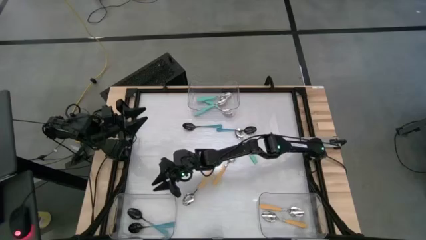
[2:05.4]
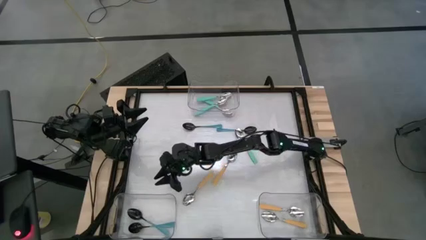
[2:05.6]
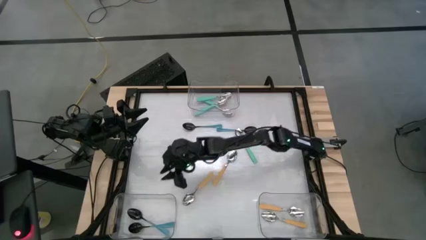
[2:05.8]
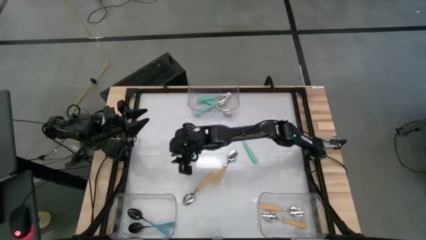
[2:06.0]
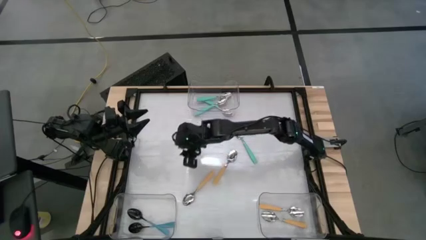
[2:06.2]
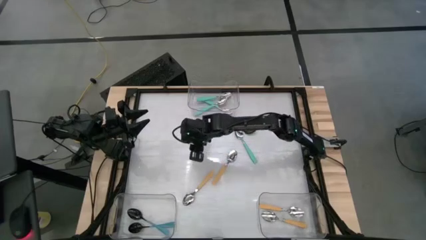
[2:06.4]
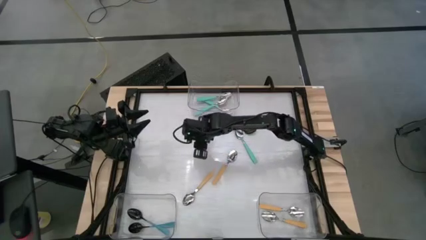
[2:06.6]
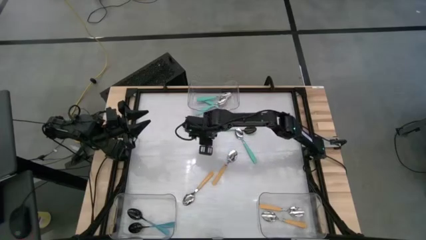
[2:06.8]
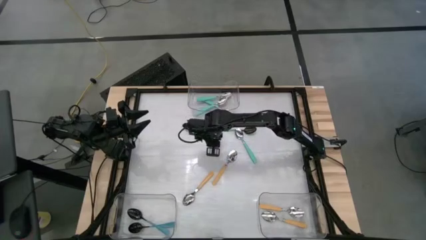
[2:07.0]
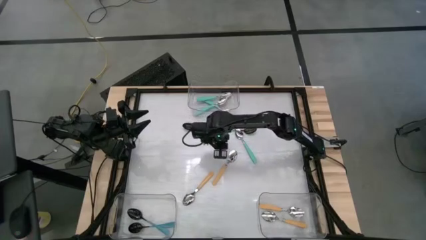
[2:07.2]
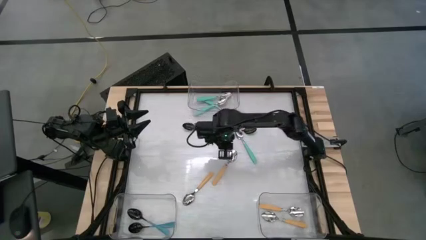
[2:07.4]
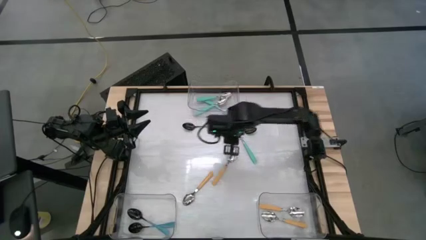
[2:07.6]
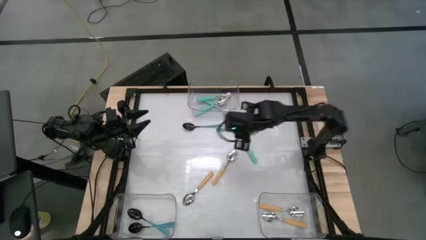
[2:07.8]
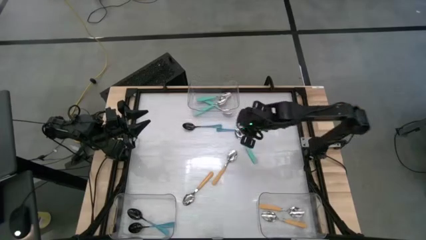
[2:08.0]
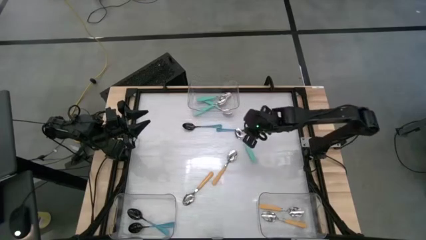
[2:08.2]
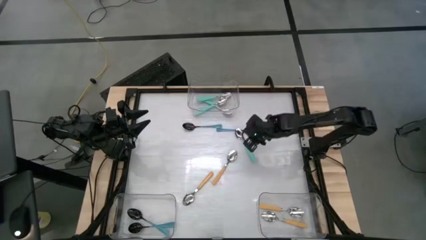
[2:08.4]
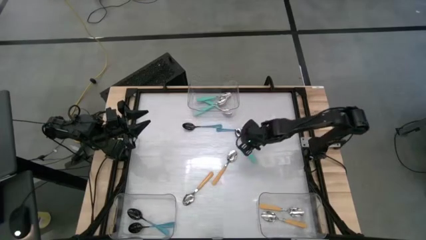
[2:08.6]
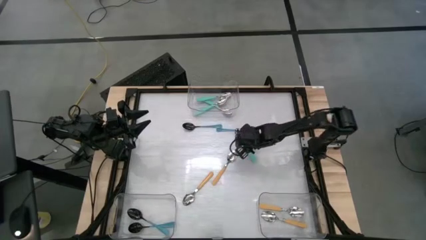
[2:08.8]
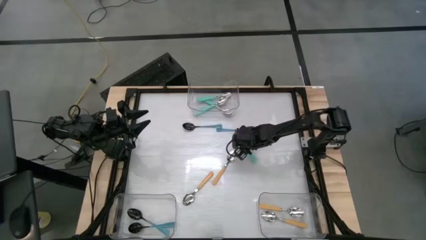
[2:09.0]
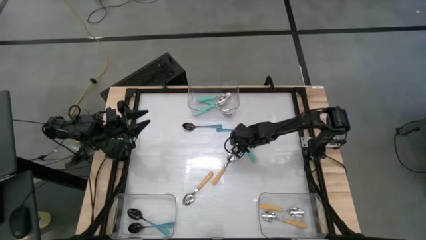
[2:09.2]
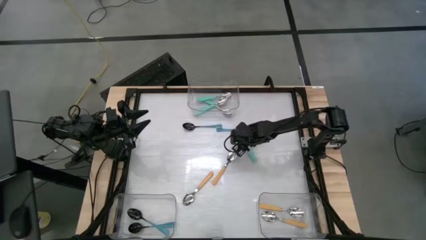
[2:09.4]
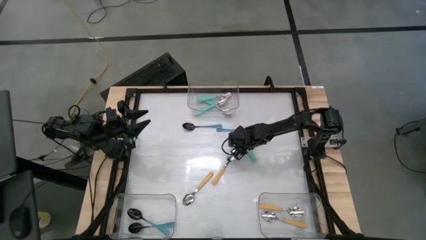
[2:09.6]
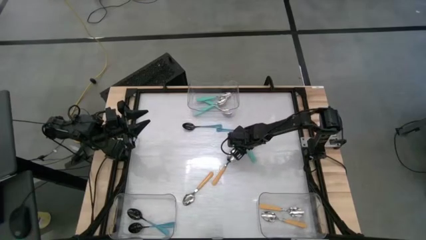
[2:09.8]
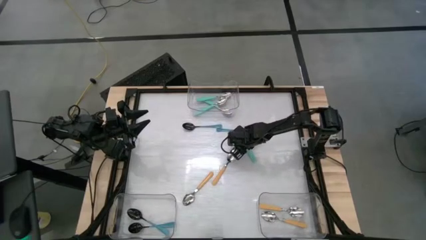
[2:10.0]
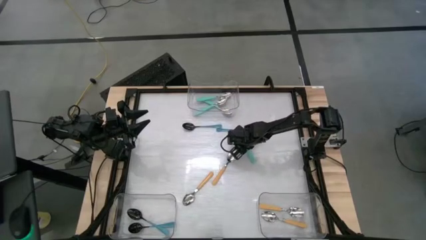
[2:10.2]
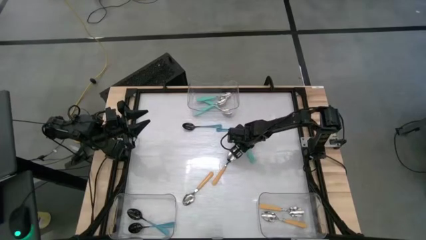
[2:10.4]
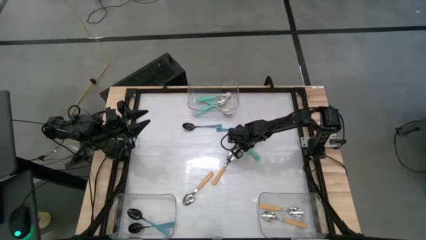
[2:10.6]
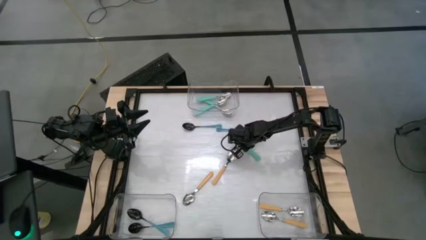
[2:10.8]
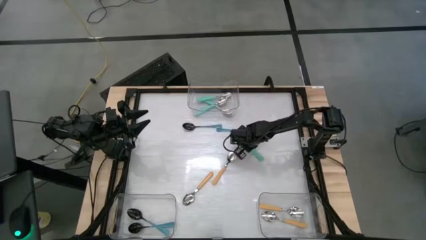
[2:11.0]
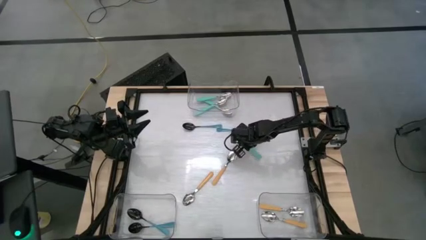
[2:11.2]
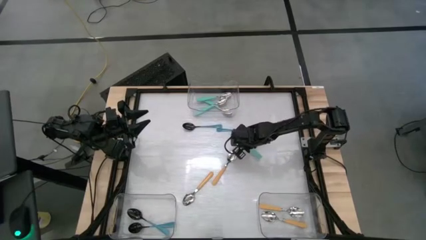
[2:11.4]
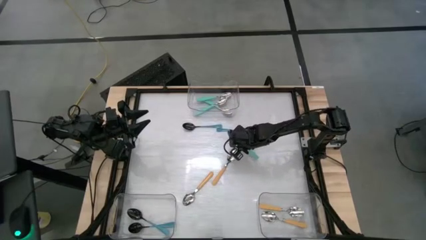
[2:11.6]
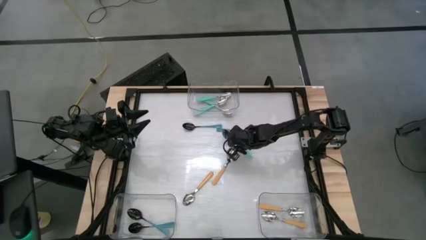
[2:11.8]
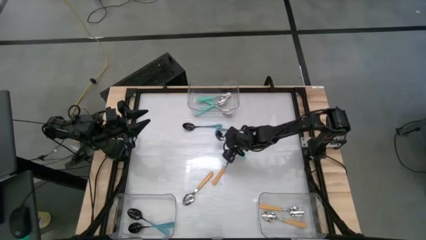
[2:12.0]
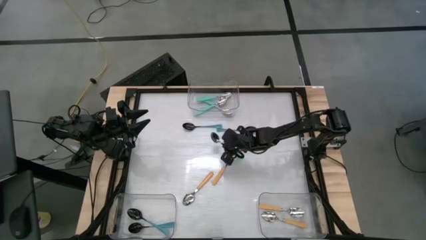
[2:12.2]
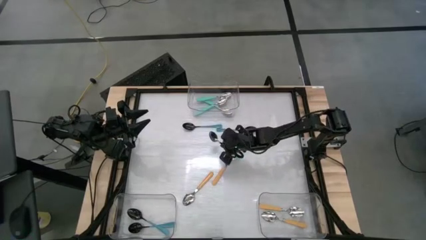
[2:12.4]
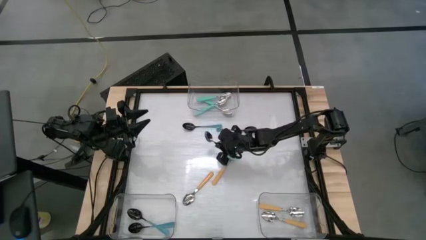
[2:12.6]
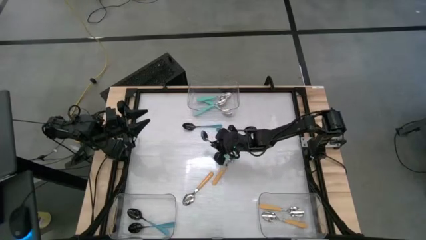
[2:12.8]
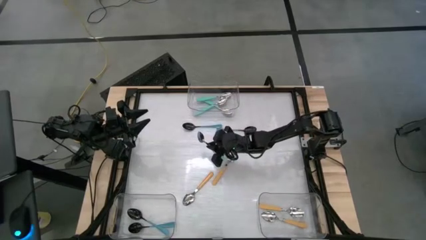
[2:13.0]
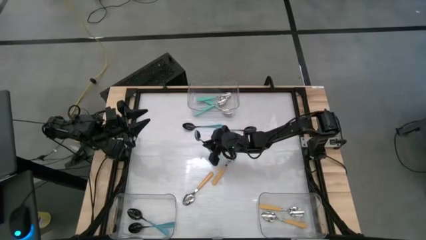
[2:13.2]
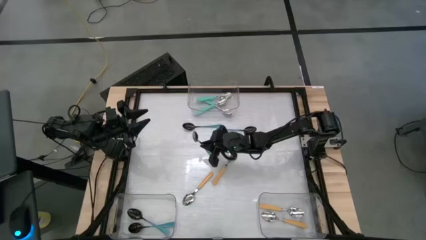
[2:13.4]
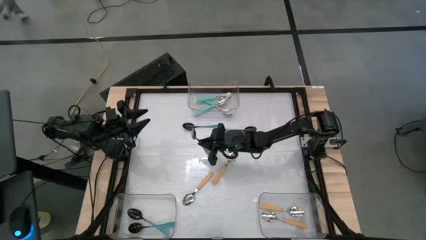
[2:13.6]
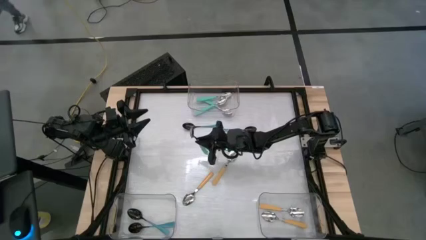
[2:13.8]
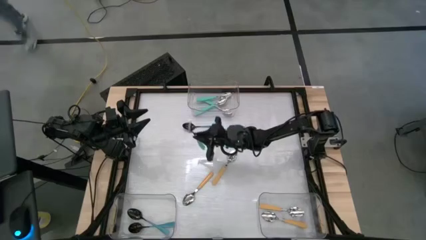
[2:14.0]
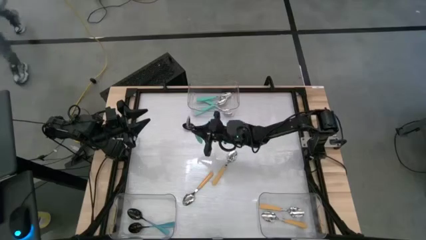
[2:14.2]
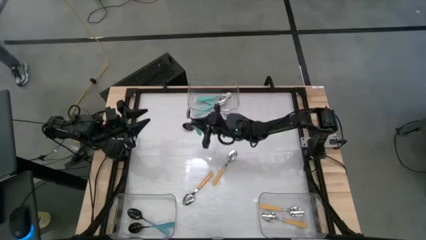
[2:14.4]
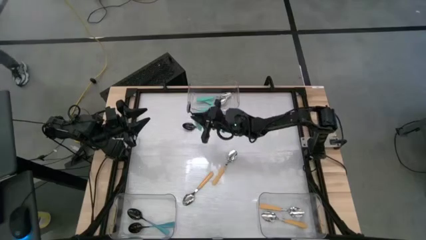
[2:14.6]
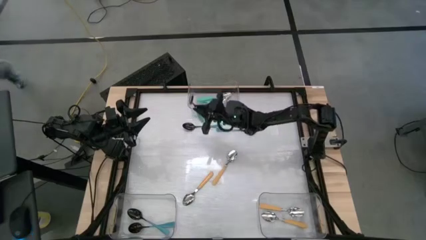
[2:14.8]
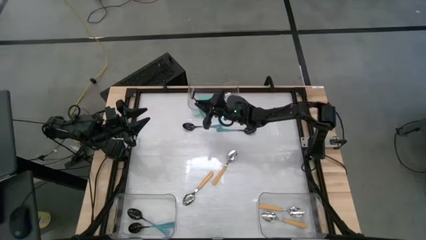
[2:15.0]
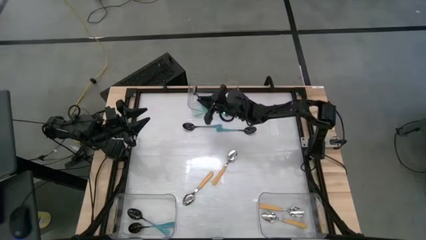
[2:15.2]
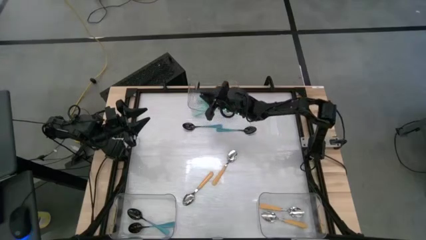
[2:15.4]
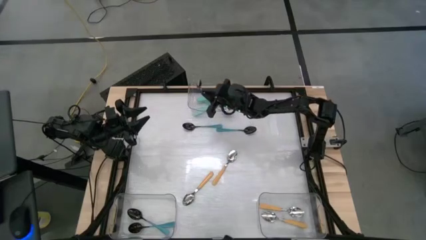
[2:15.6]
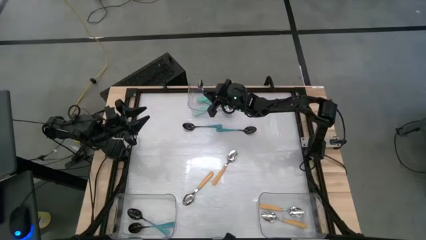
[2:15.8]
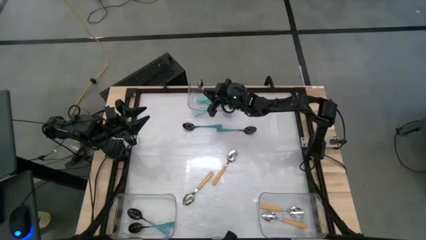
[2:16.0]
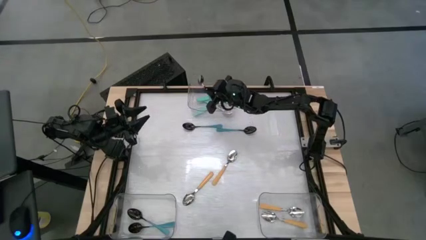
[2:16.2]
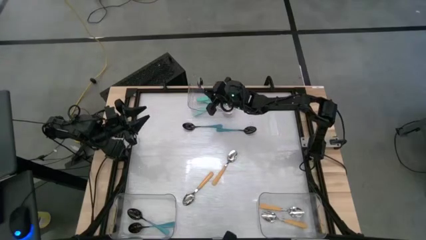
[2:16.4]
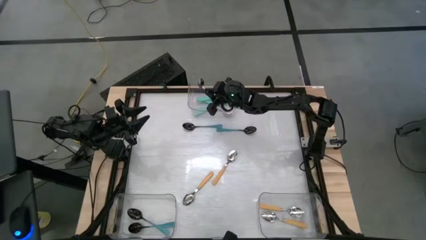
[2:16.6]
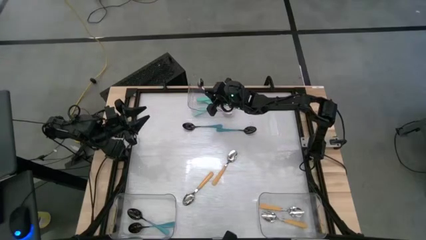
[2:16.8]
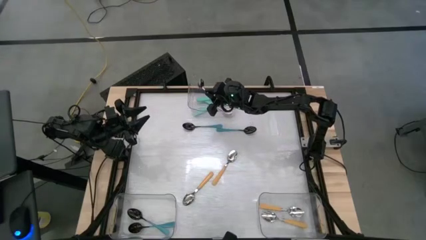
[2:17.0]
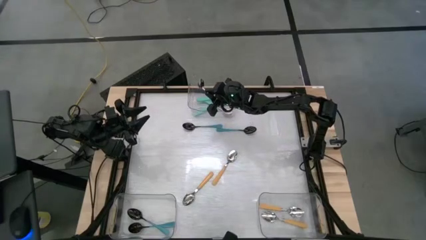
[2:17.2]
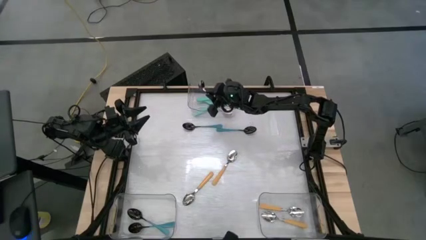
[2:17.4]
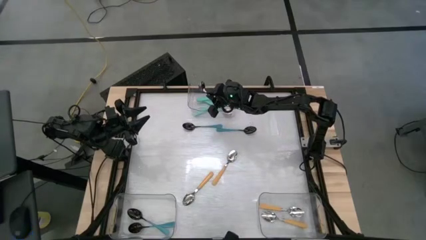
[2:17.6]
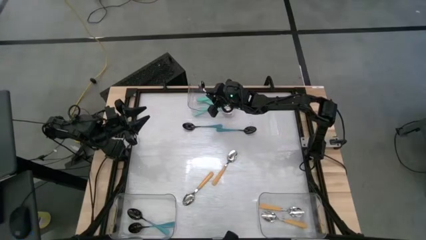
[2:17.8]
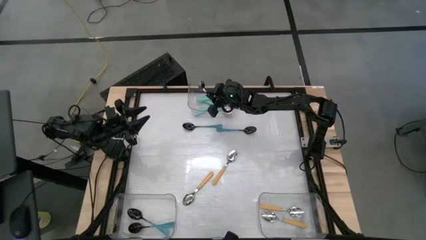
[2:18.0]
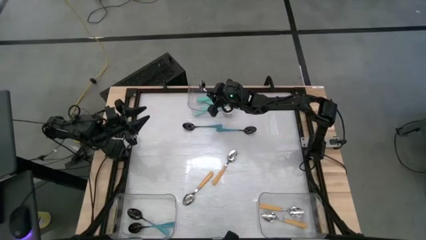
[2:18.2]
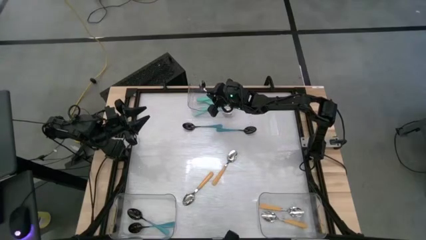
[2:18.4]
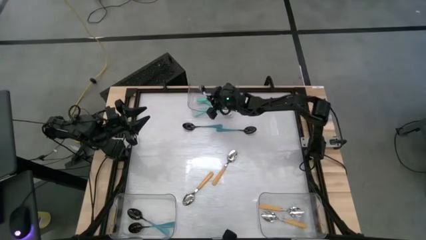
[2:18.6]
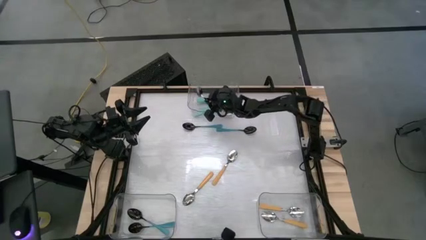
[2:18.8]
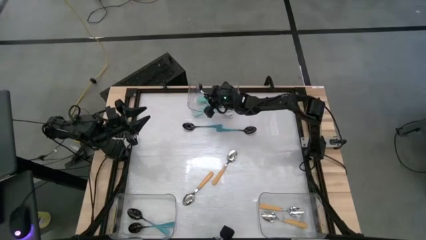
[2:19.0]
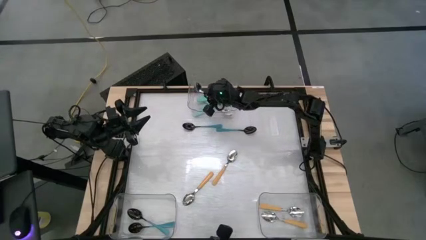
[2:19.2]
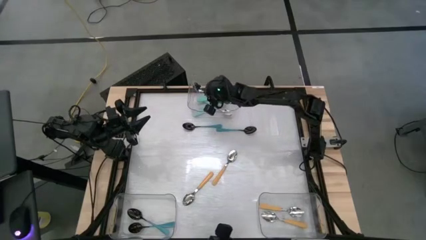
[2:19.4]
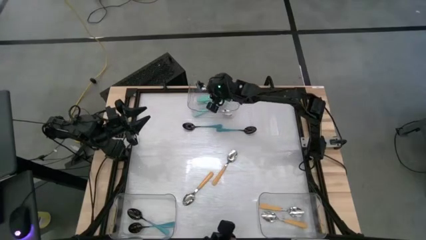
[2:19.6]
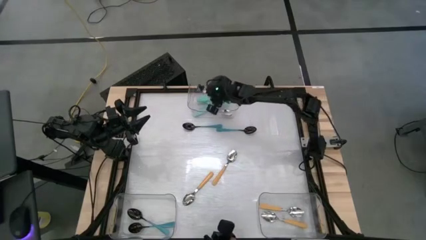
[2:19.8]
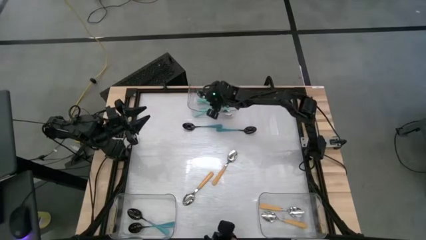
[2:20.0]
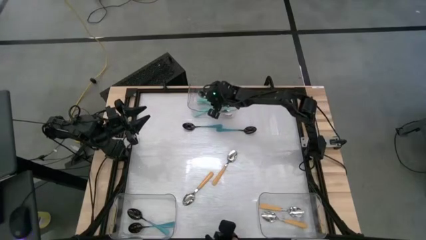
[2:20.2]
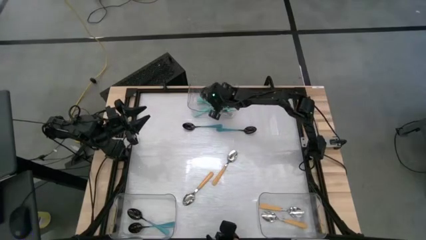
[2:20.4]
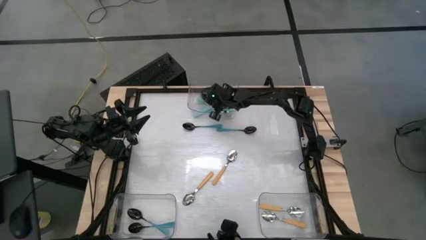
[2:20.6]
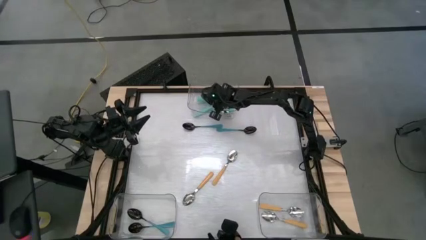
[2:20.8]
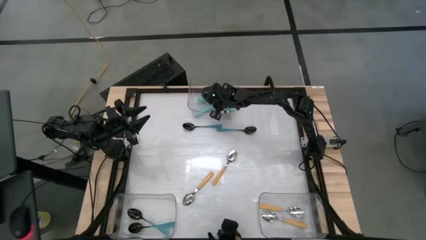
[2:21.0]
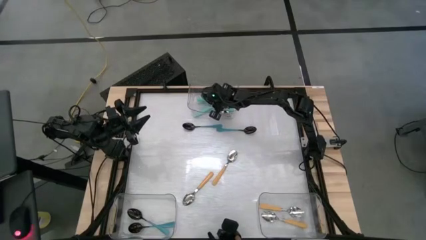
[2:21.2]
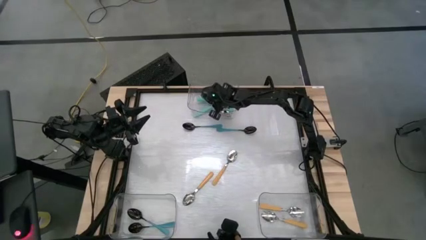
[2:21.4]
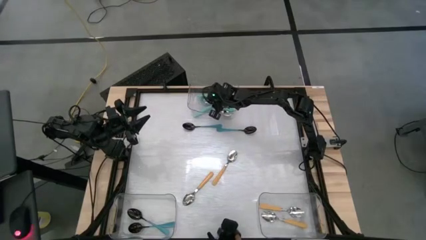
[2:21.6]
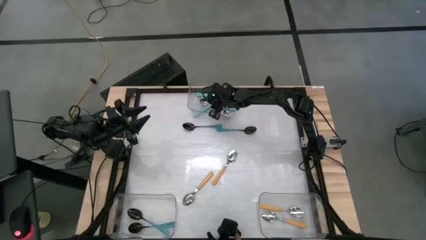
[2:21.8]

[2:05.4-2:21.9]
Task: Sort silverware by color (type)
Put the blue spoon into the top transparent bin
